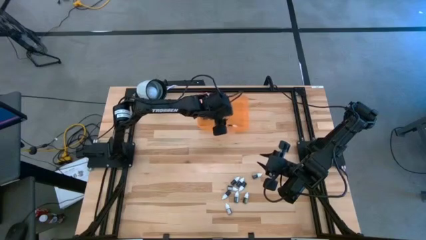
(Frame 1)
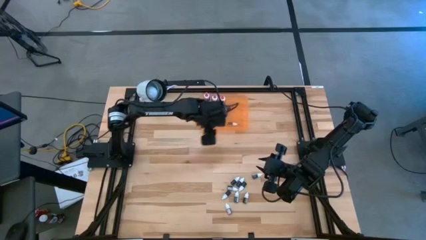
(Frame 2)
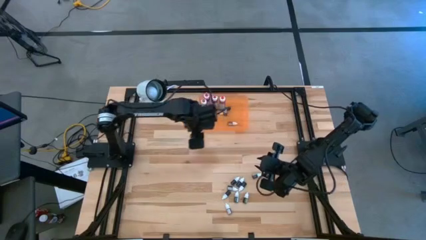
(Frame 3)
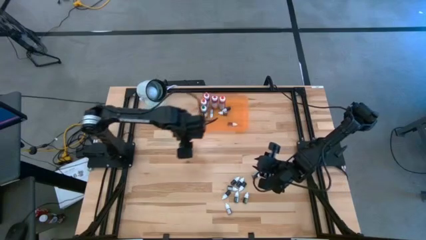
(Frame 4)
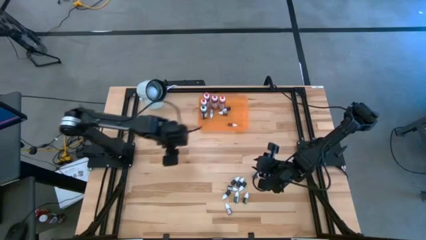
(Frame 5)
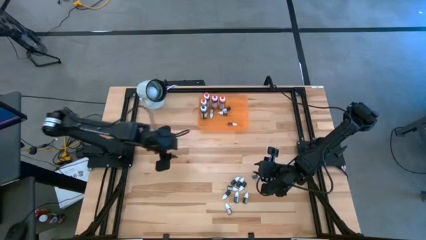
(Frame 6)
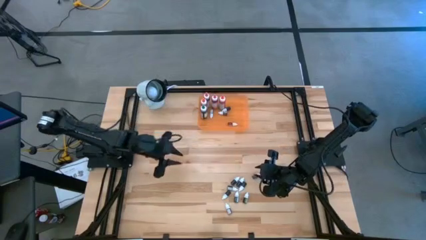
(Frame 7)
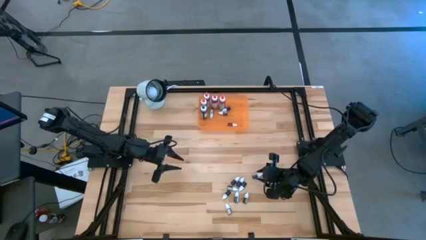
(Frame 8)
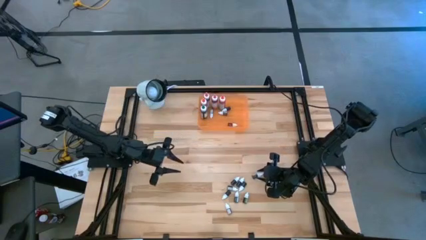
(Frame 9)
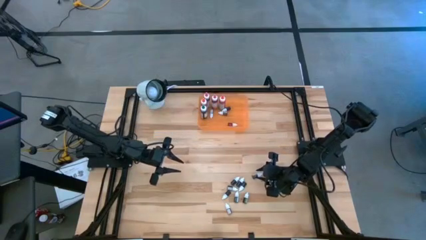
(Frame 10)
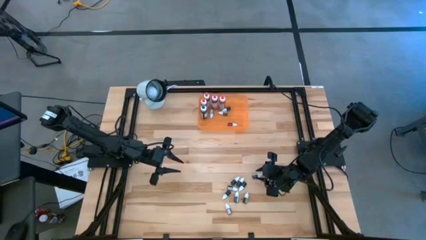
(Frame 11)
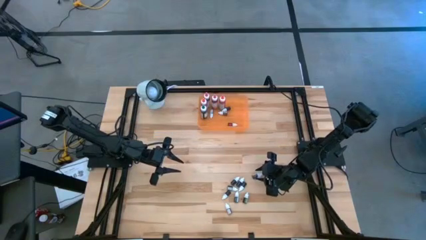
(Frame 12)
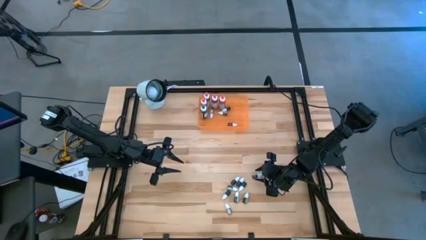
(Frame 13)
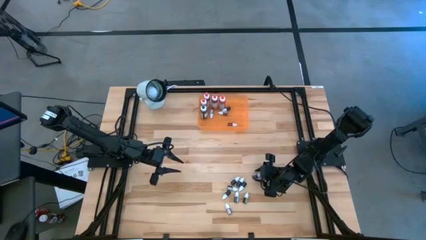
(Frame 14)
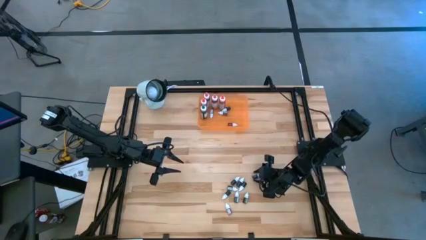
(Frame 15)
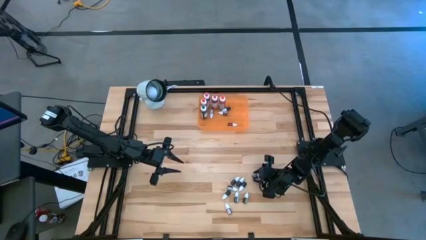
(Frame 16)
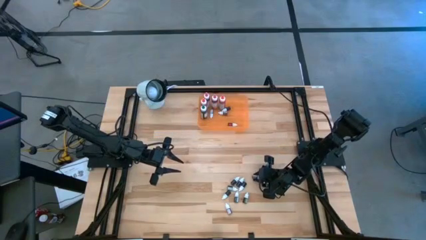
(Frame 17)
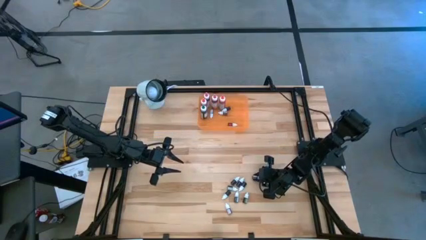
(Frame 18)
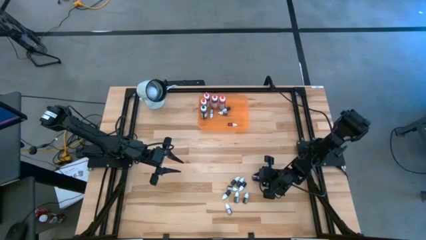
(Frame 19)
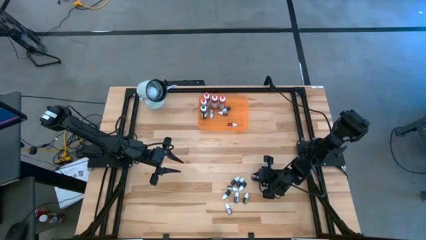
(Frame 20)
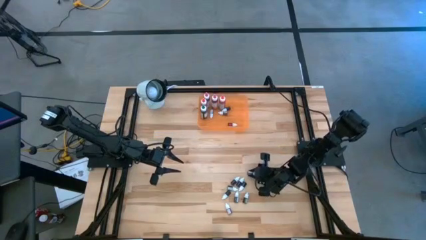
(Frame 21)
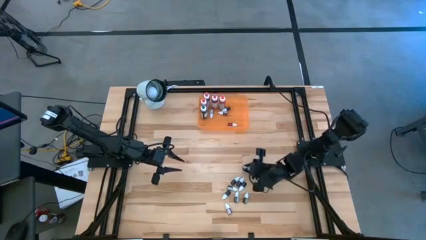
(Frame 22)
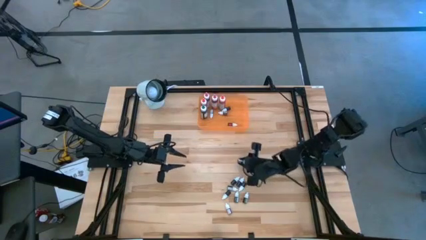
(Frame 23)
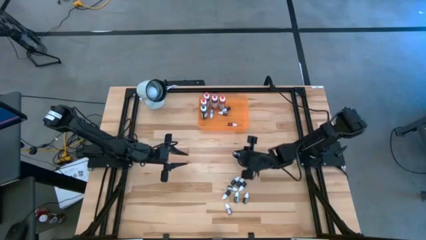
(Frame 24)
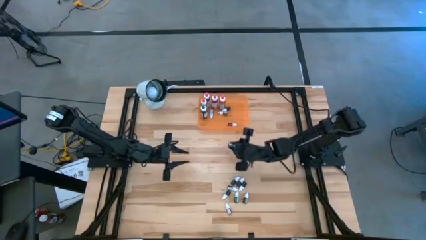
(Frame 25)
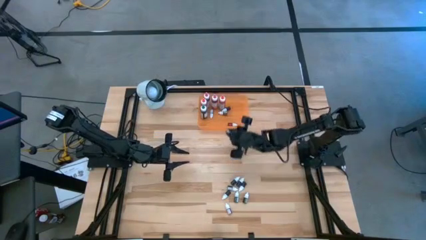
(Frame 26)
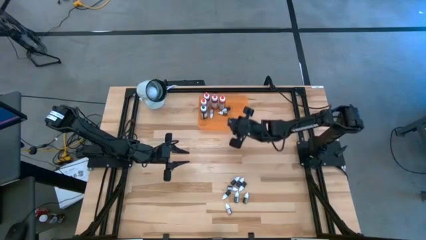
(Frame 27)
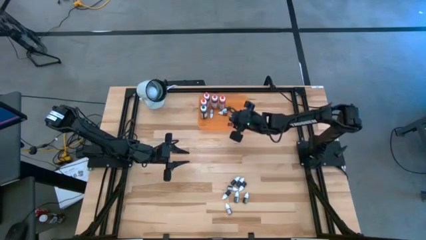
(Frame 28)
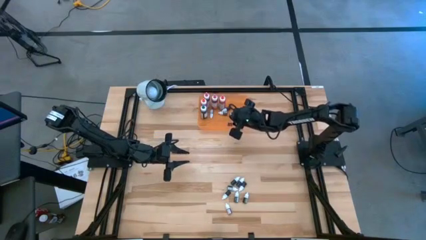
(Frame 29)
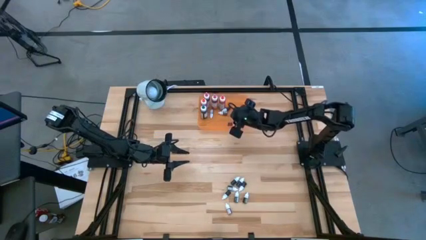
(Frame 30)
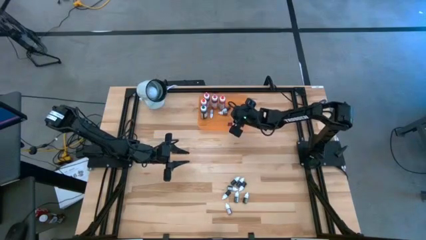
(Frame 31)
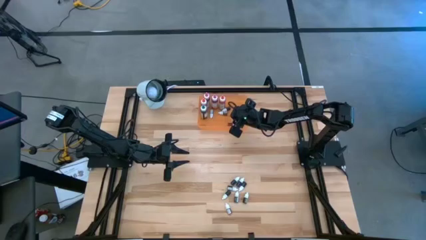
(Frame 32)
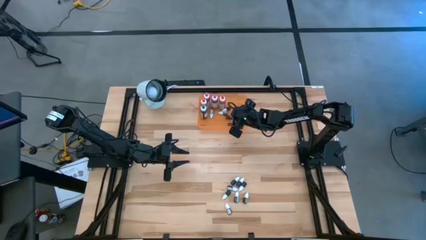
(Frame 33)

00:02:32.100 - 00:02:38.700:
Task: Pick & Place food coloring
Put the black small food coloring bottle into the orange bin

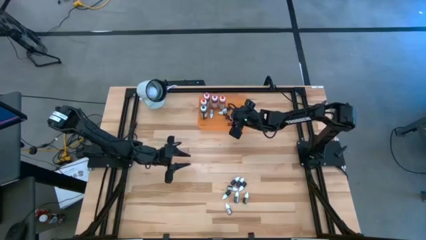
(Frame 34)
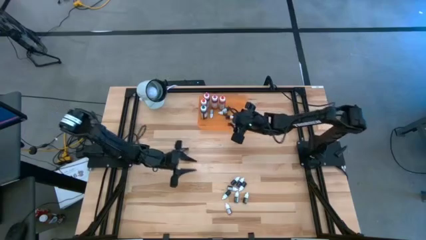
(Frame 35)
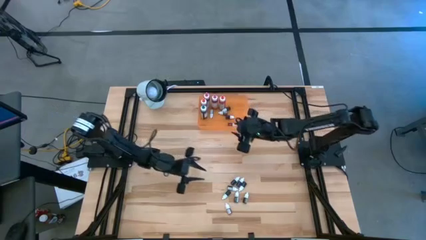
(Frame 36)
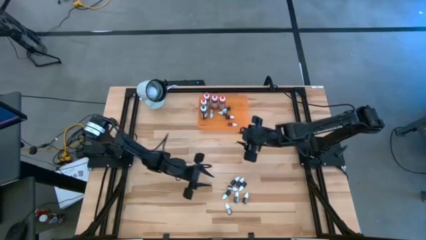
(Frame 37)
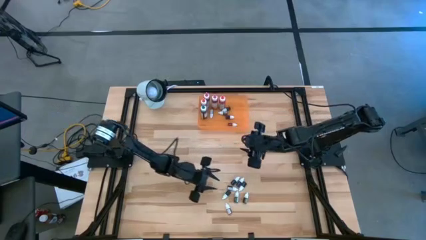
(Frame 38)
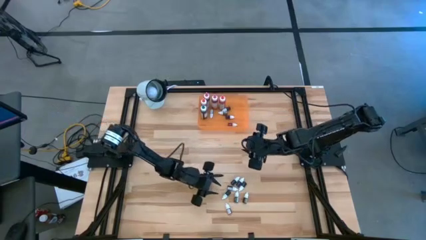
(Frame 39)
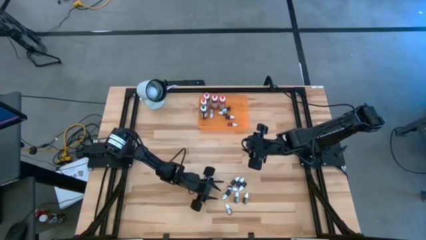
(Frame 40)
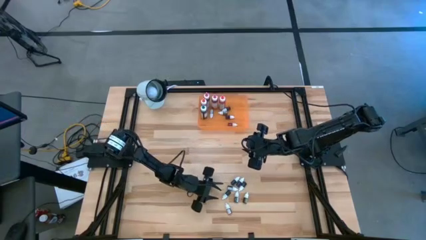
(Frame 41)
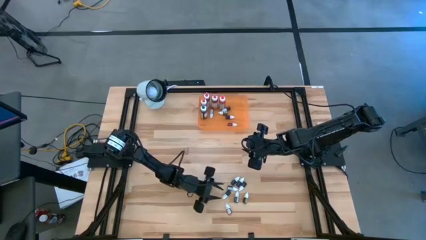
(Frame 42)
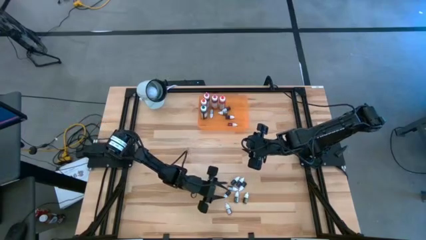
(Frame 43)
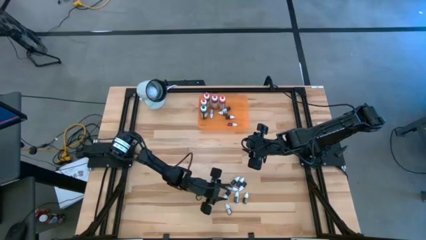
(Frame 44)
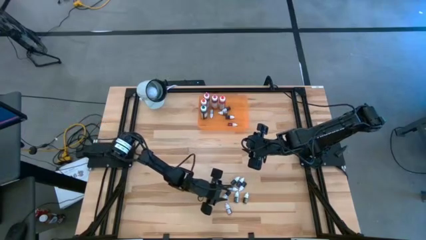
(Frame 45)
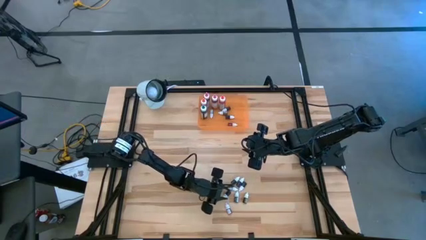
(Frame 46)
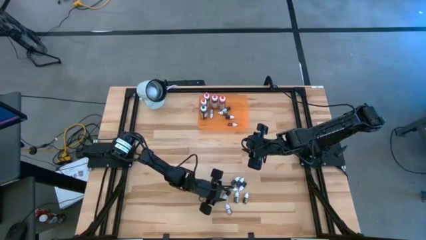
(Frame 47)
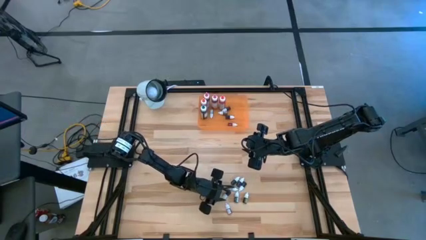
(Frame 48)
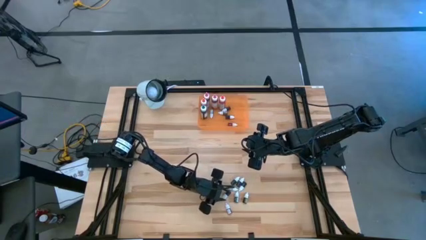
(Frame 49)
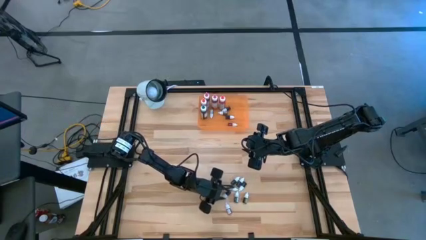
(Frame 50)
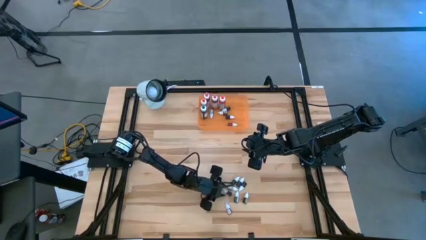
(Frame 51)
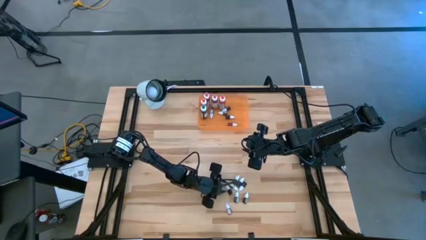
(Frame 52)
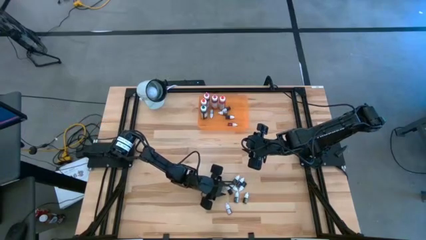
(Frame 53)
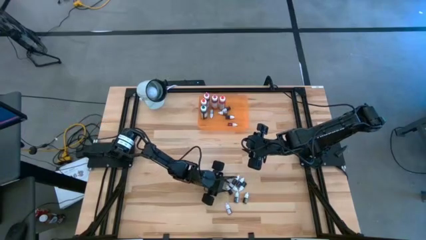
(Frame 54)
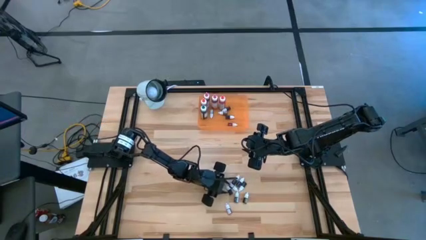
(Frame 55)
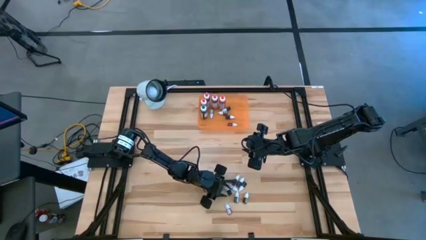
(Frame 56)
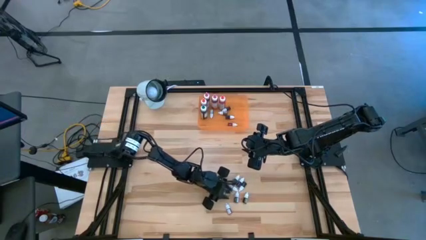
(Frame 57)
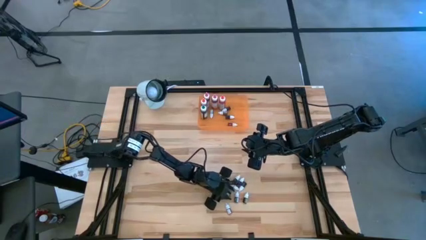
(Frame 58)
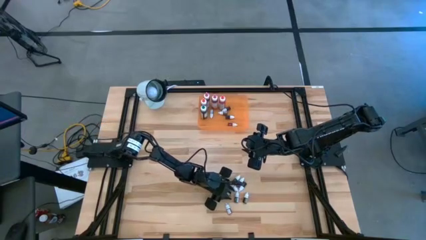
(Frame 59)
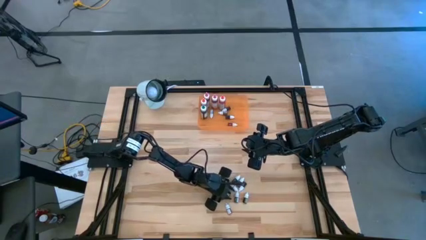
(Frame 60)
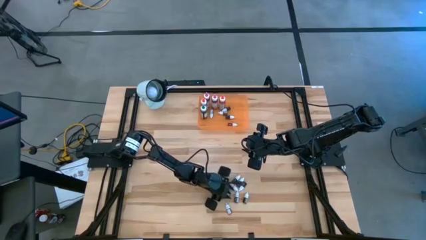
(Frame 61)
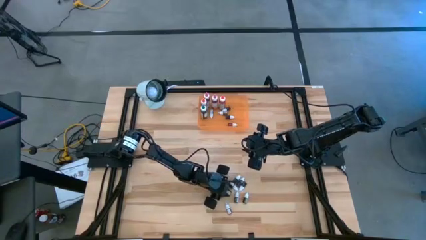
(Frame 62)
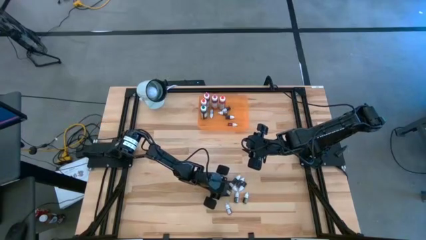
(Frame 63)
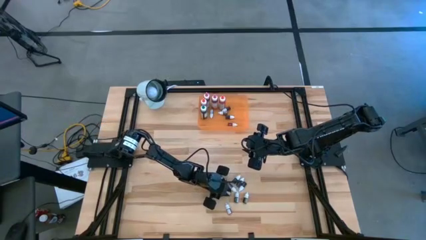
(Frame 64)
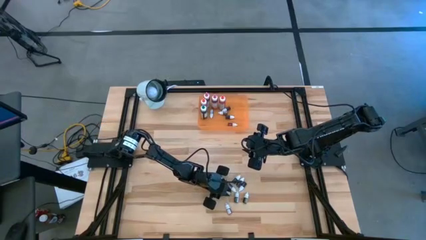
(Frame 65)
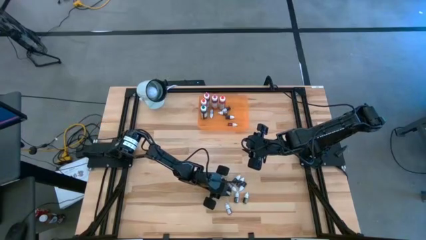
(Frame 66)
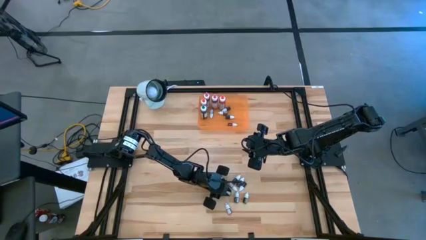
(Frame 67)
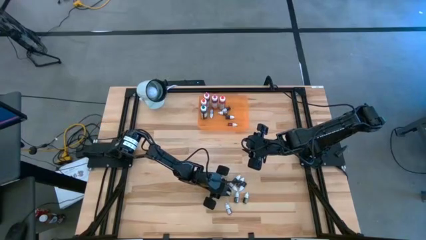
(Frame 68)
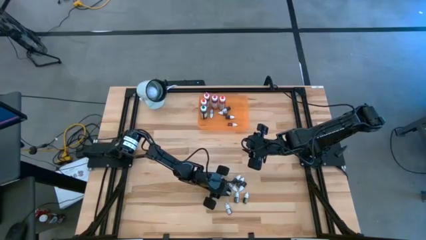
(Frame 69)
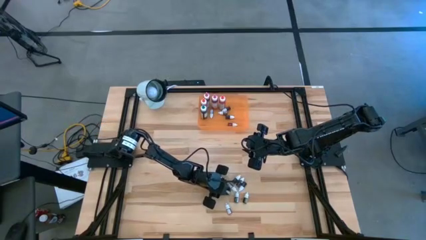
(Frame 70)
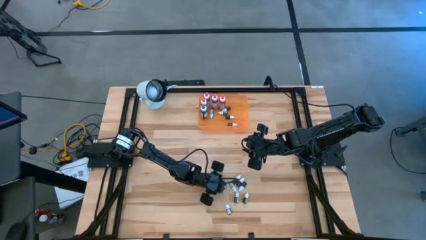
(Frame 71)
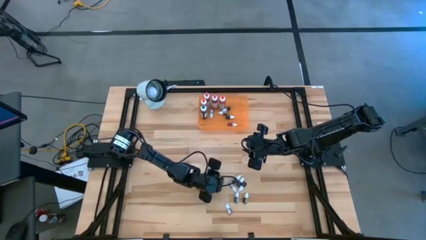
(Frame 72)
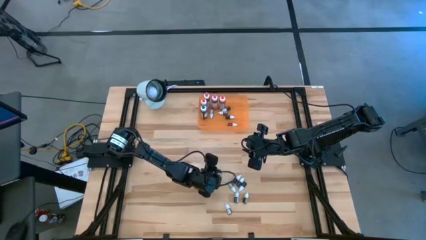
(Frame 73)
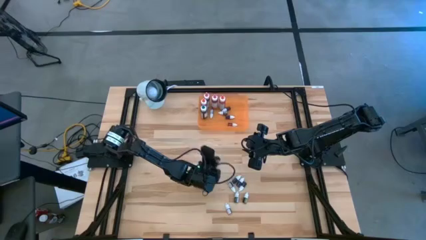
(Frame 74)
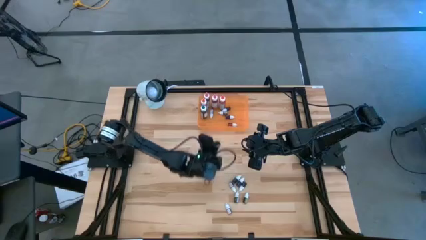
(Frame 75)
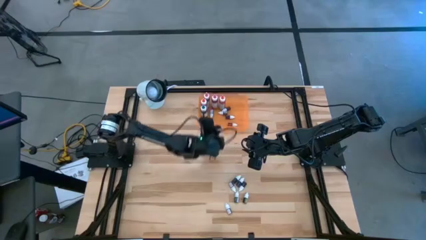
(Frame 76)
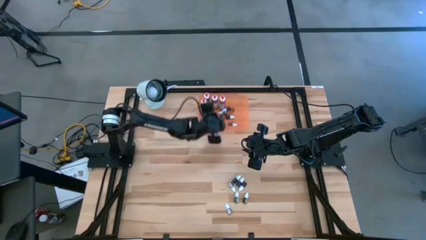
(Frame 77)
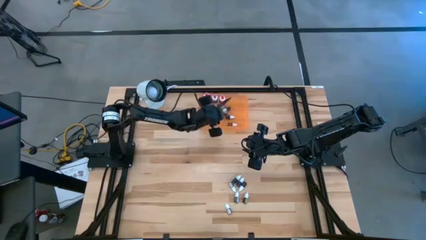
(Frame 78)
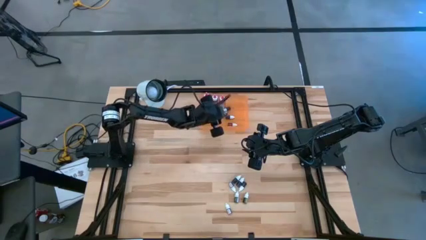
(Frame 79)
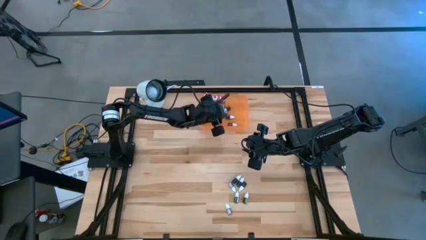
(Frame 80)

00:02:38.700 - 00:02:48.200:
Put the dark green small food coloring bottle into the orange bin
